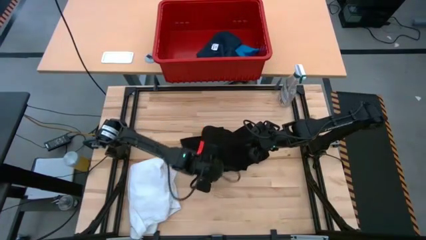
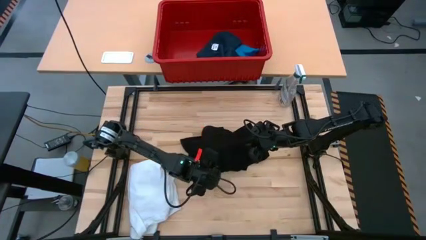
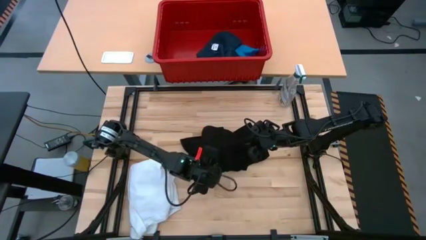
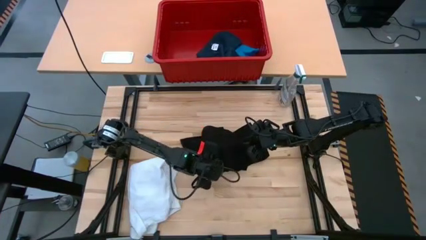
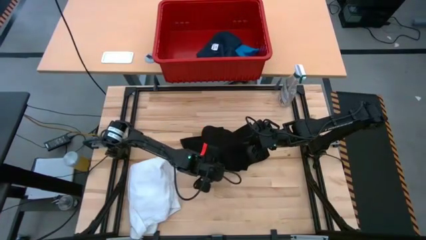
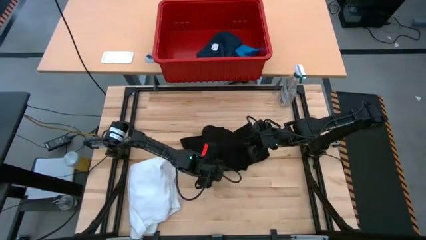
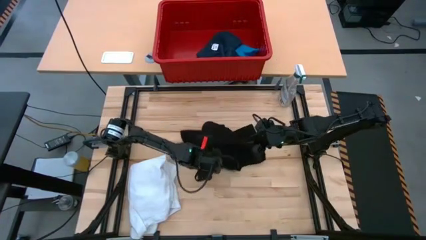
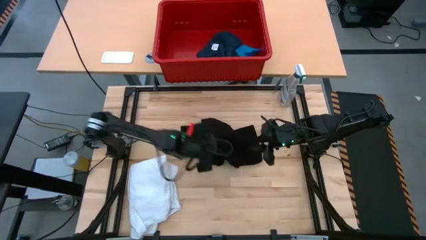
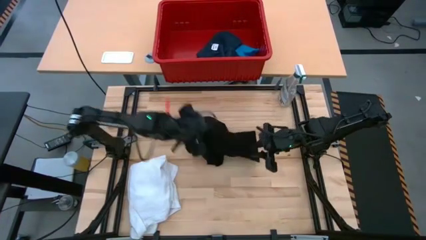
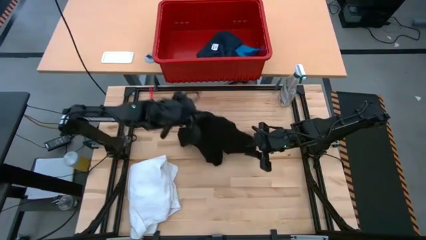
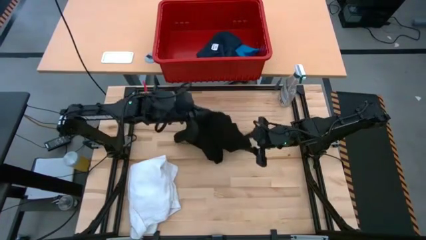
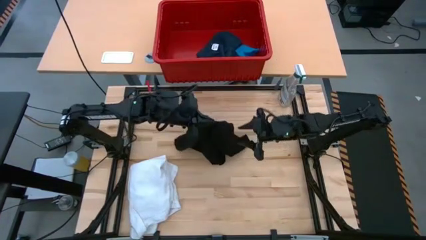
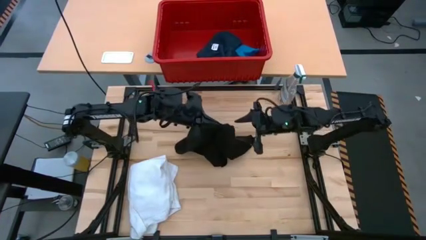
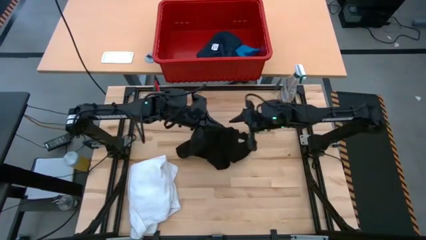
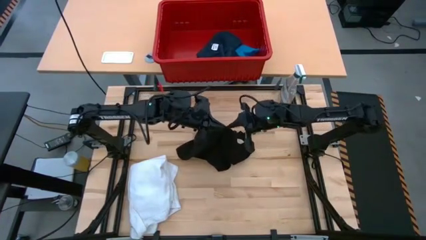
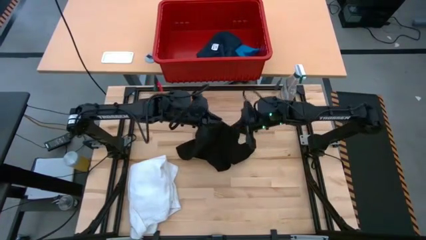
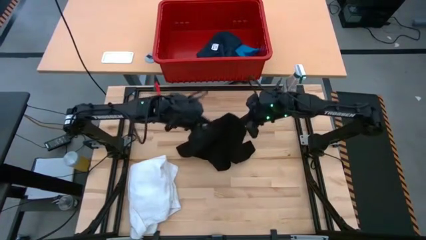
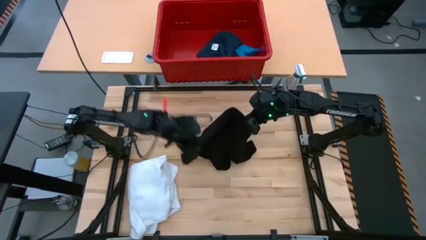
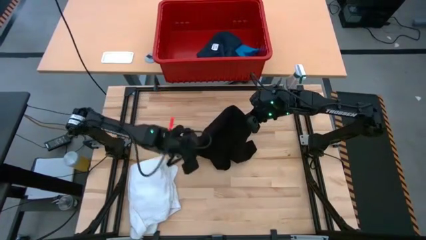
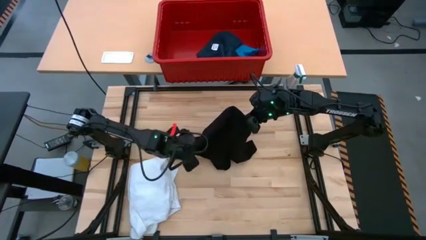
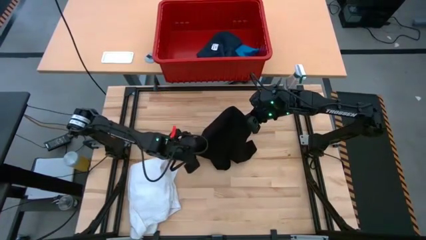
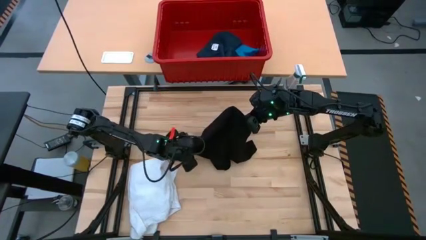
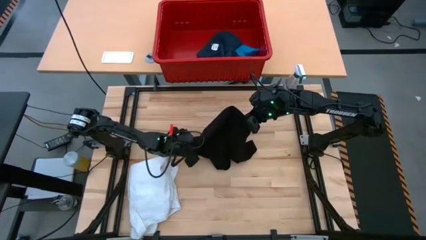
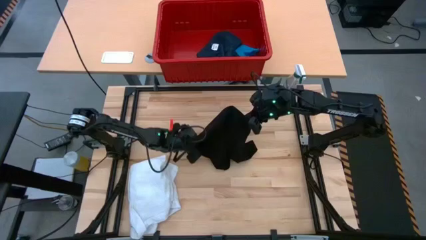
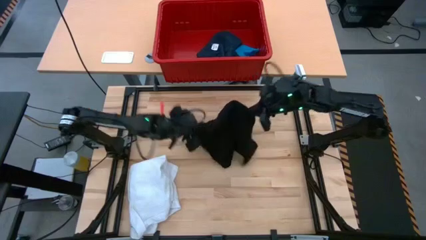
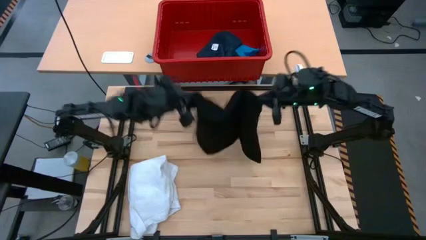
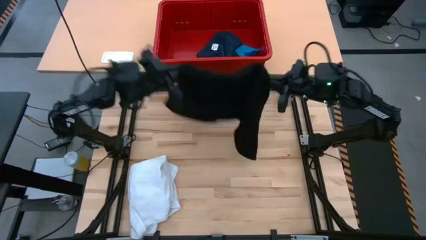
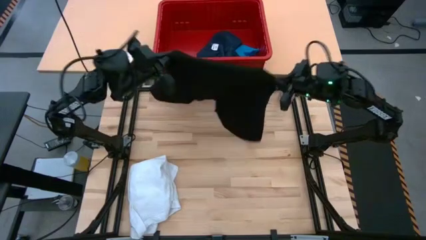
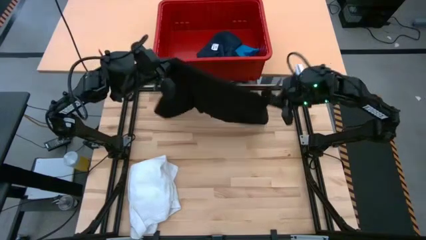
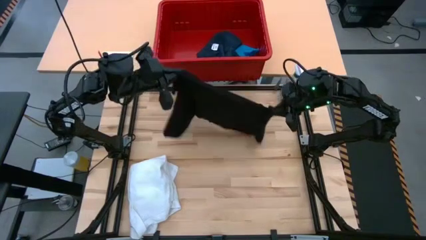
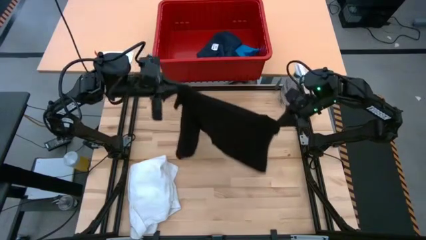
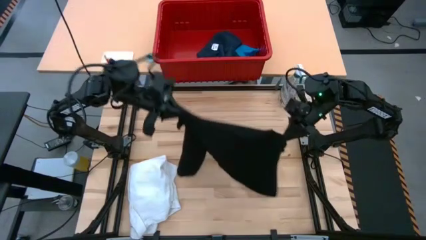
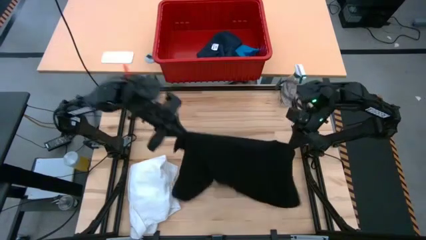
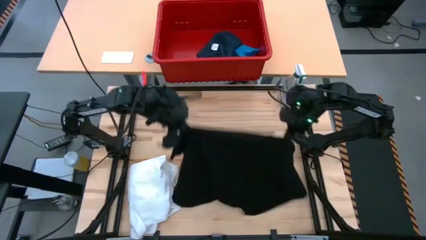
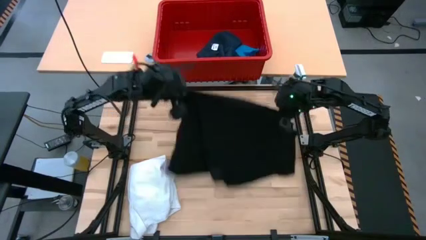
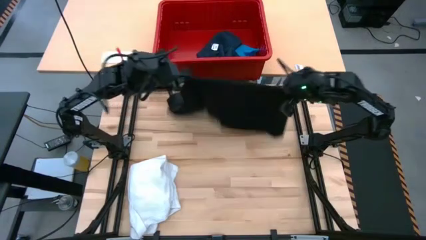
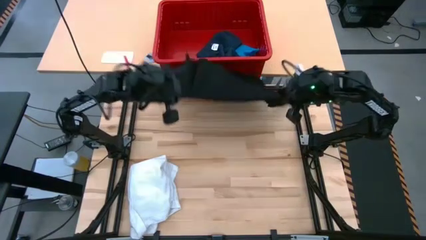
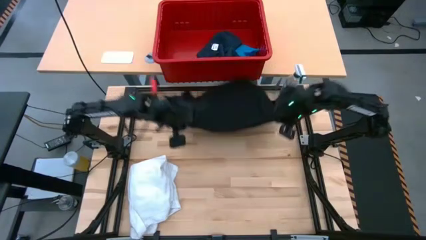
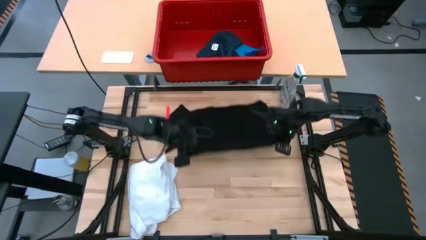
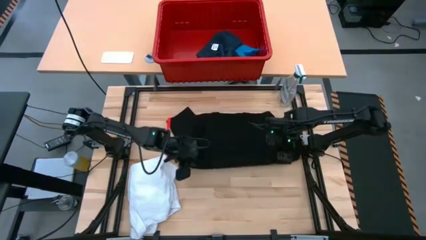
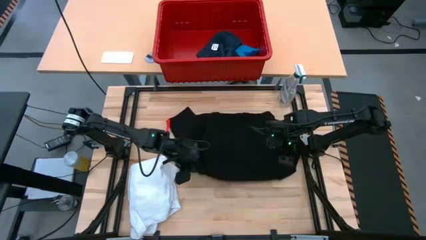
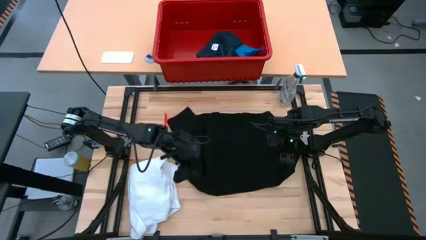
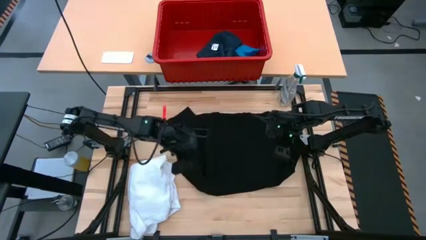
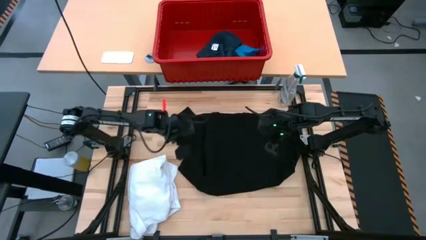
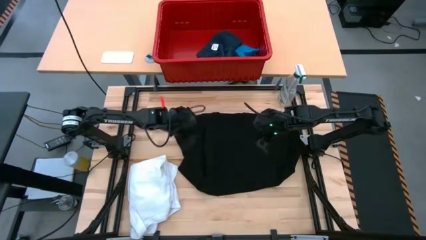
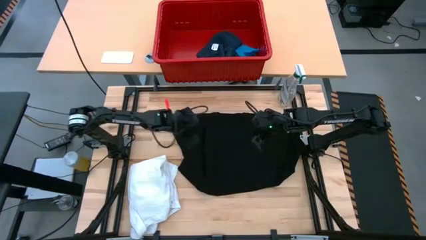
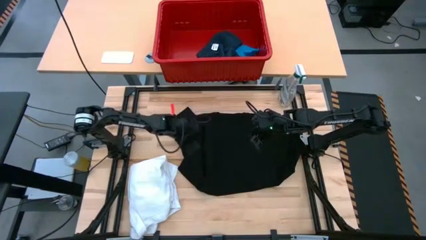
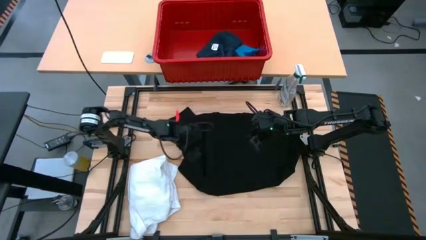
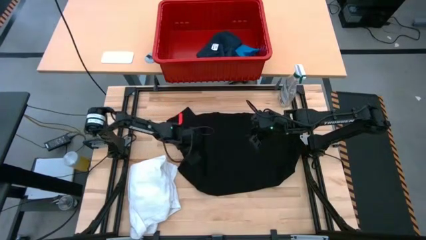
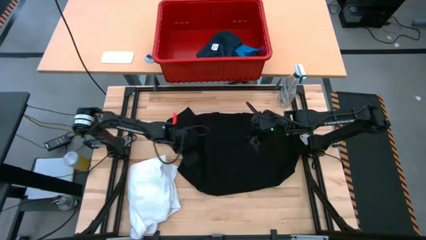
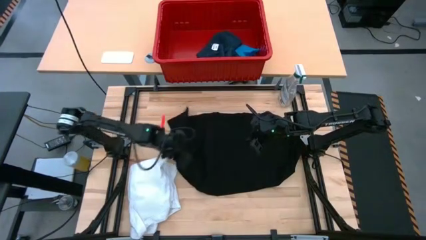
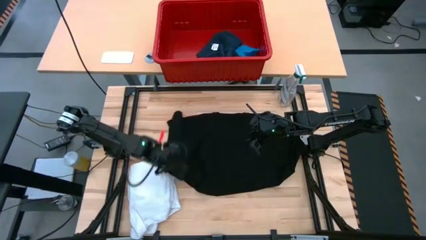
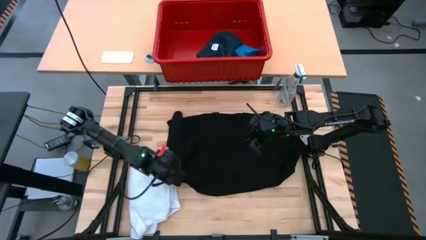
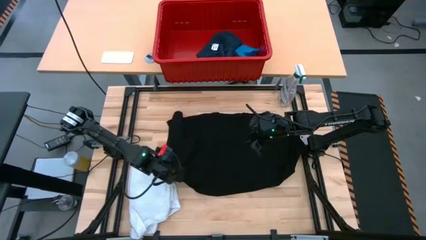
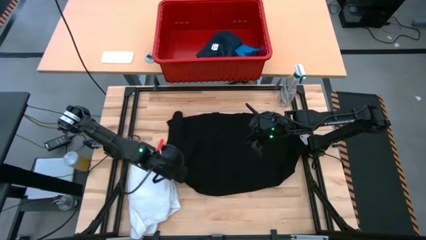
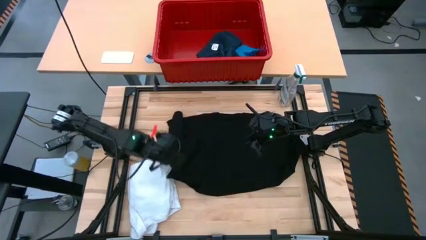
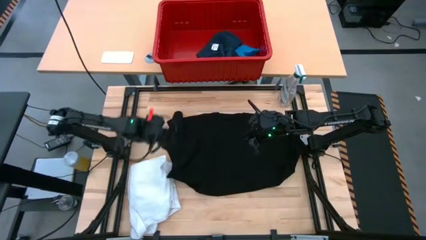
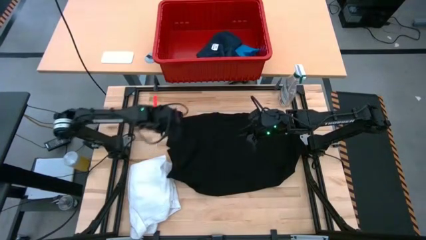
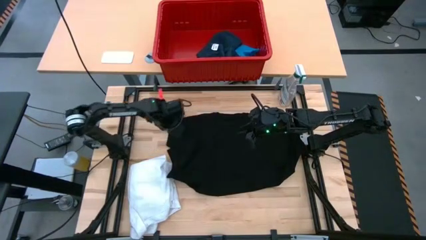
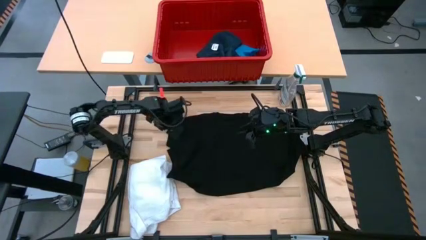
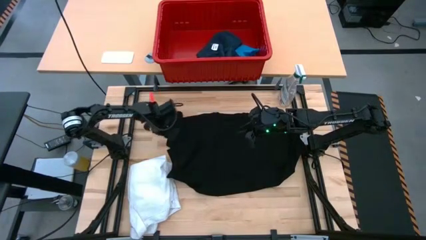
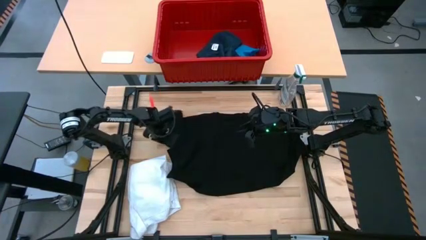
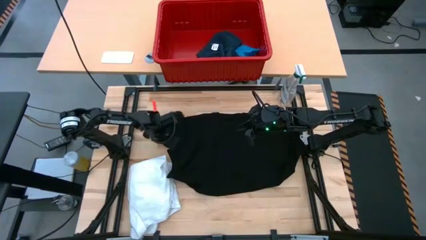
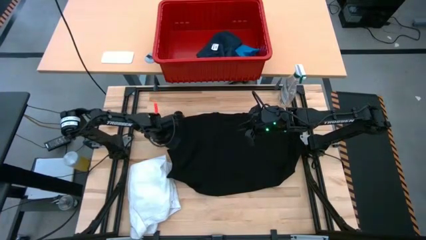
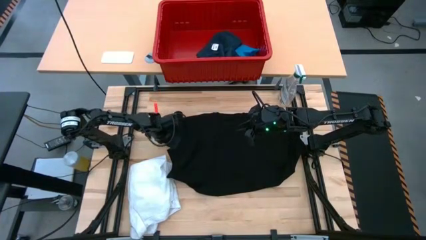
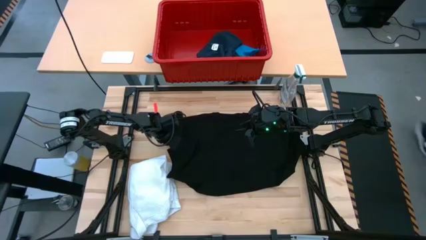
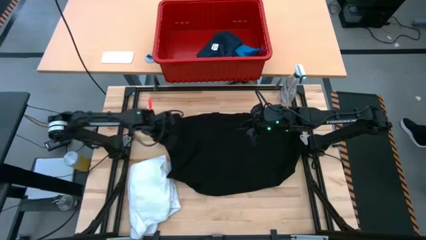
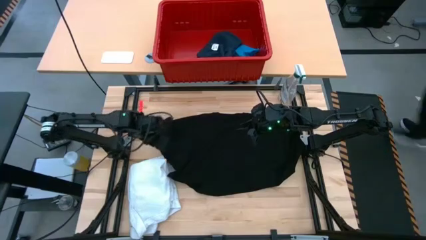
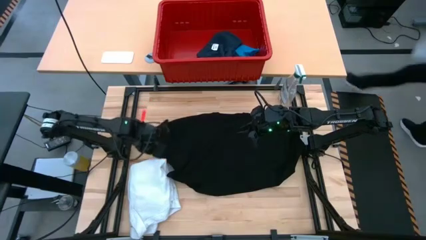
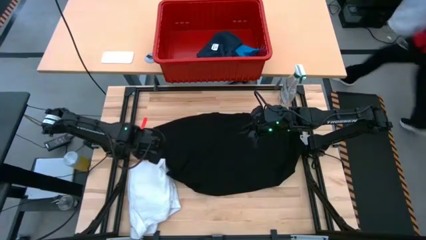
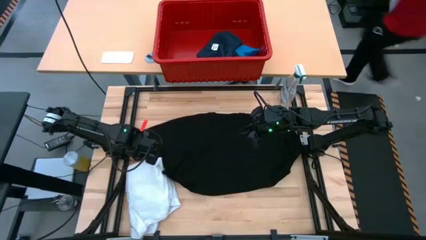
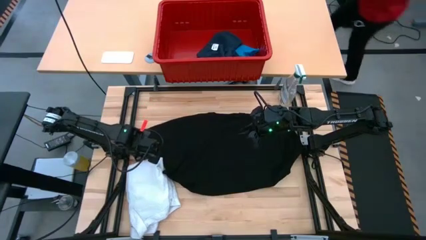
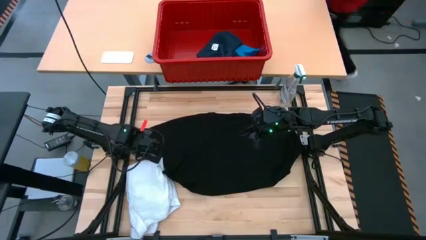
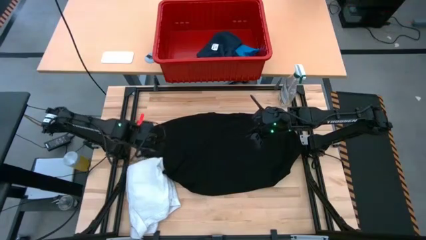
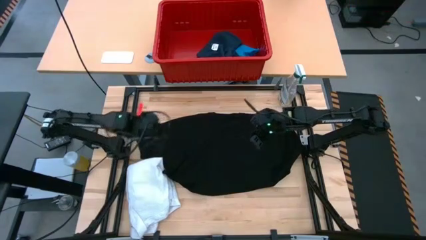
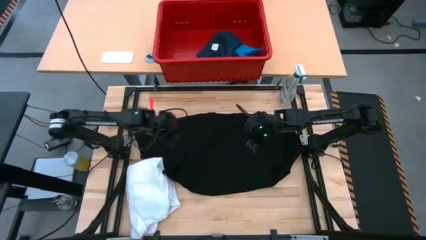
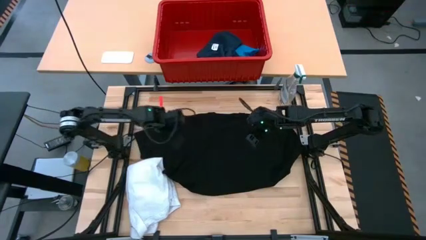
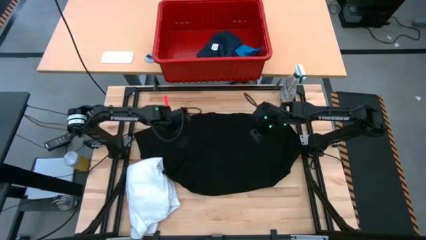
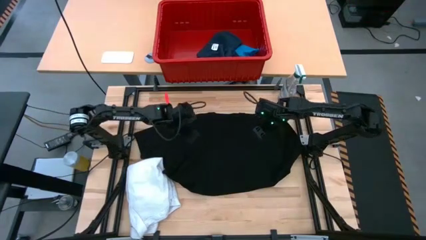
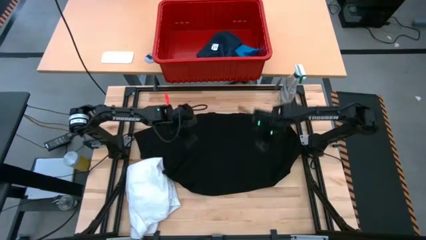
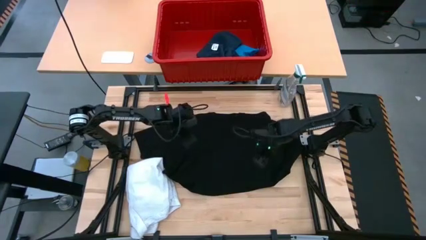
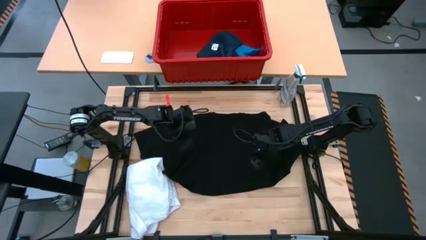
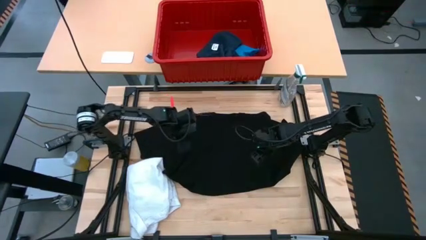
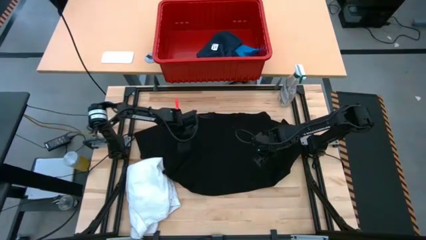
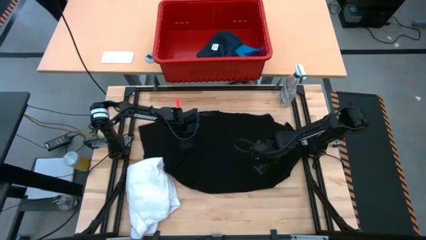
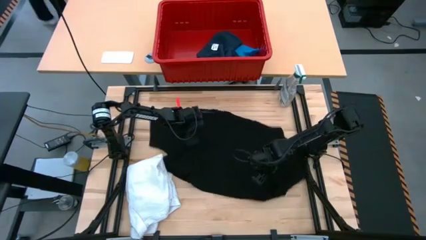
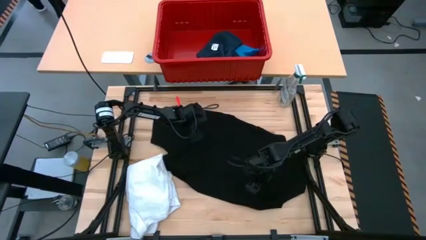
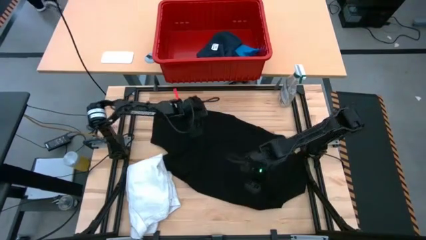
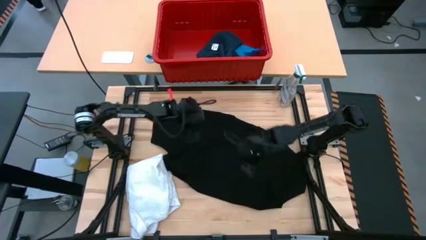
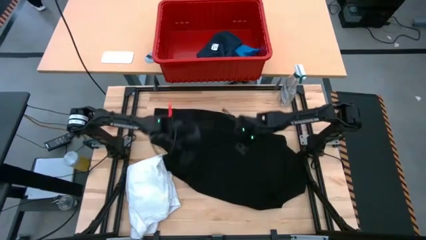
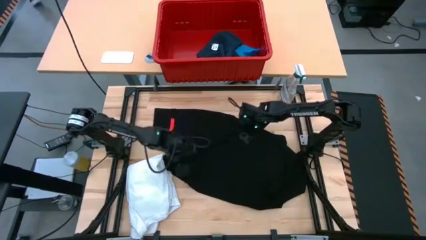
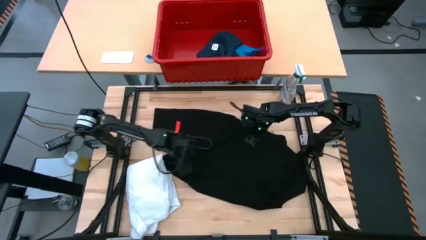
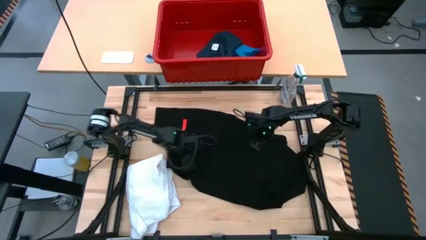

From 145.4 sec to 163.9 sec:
Task: Fold Laundry from Bin
Fold the black shirt
